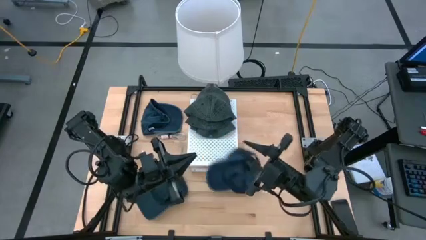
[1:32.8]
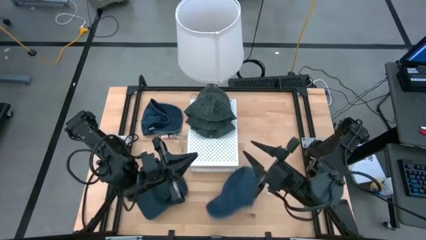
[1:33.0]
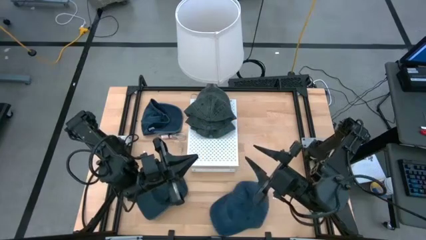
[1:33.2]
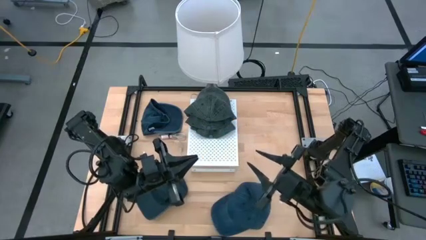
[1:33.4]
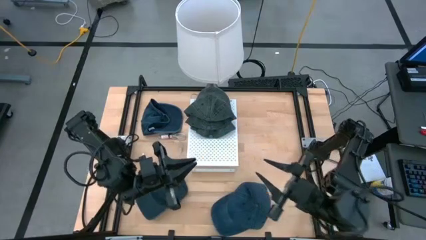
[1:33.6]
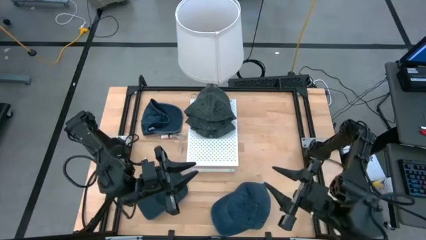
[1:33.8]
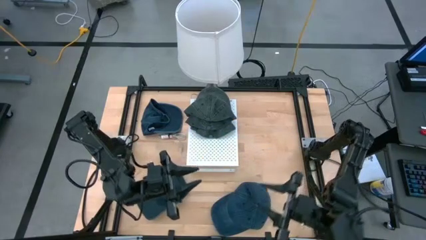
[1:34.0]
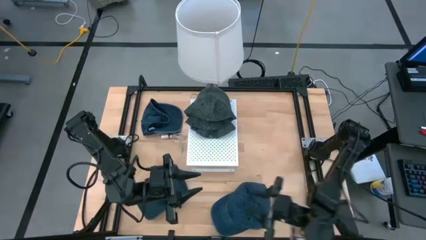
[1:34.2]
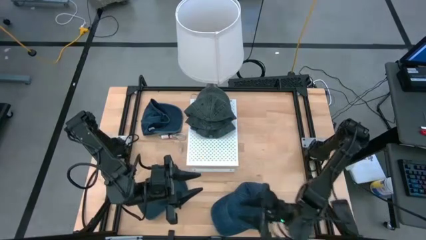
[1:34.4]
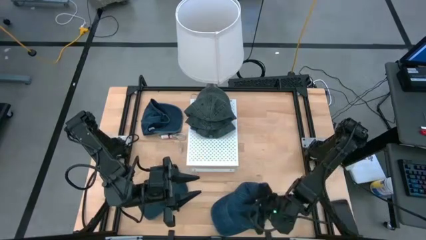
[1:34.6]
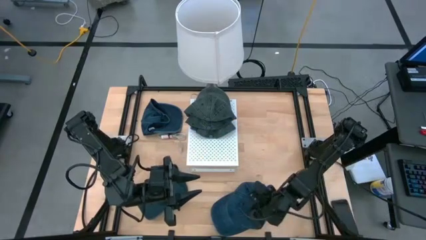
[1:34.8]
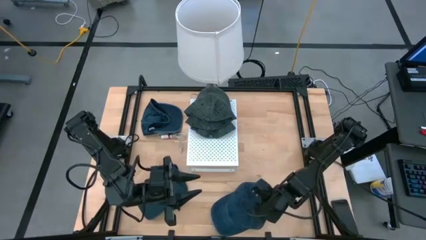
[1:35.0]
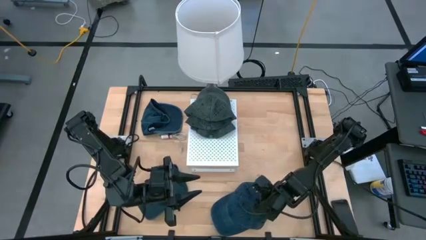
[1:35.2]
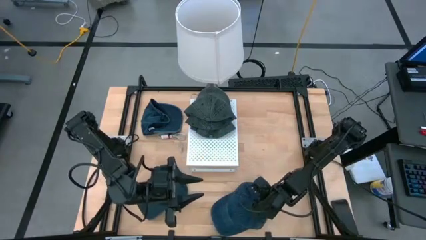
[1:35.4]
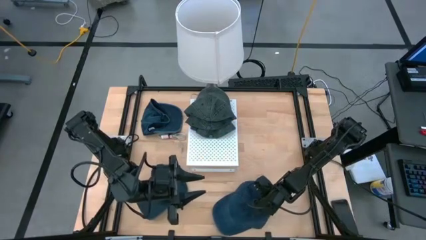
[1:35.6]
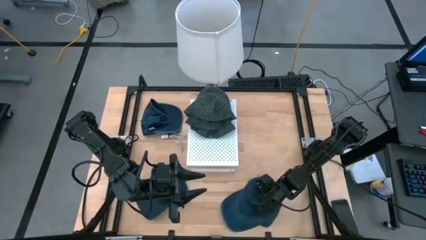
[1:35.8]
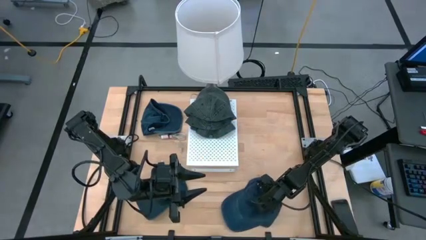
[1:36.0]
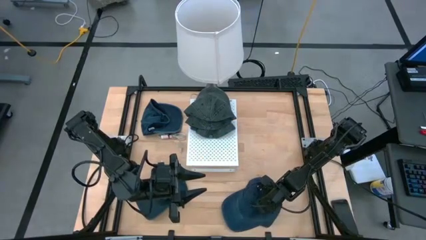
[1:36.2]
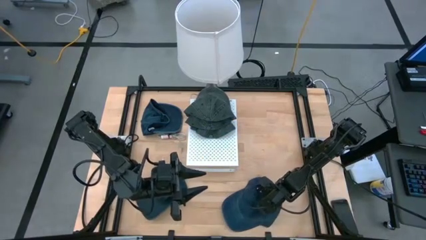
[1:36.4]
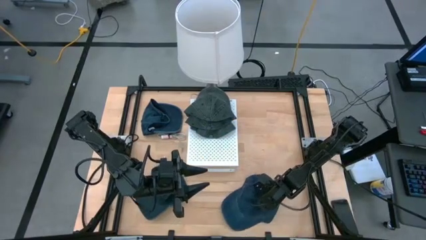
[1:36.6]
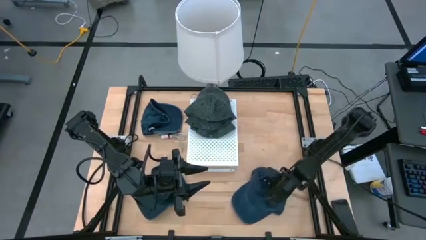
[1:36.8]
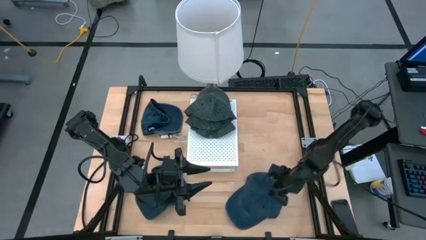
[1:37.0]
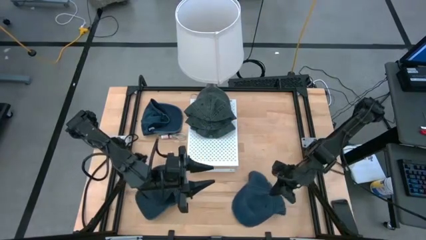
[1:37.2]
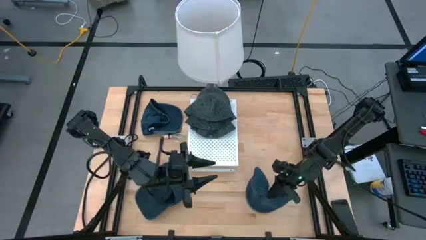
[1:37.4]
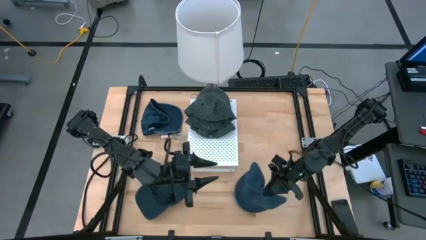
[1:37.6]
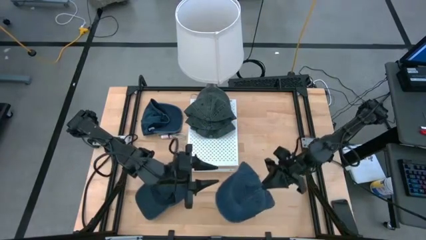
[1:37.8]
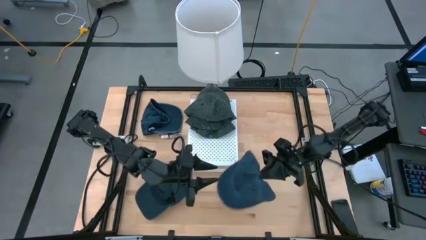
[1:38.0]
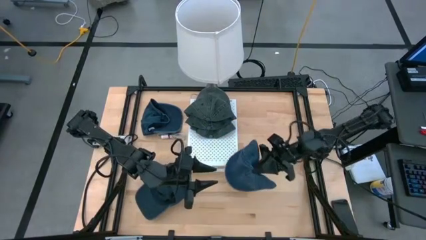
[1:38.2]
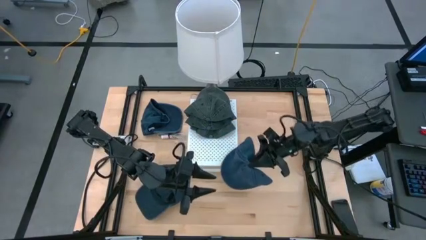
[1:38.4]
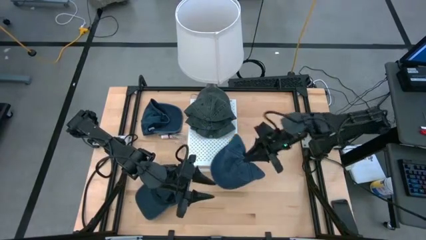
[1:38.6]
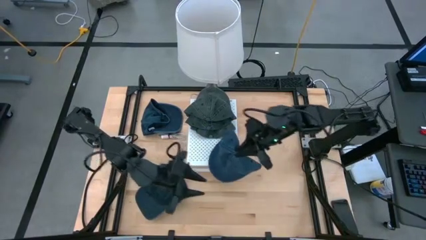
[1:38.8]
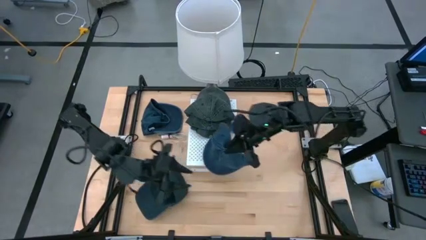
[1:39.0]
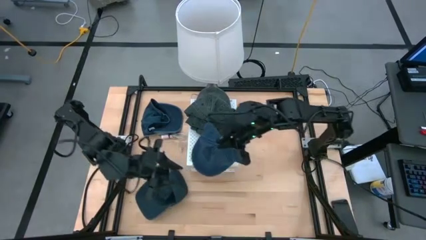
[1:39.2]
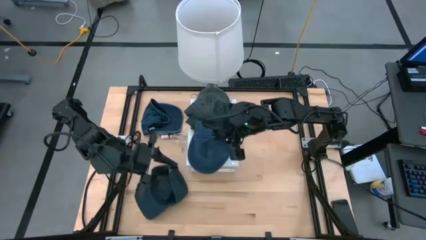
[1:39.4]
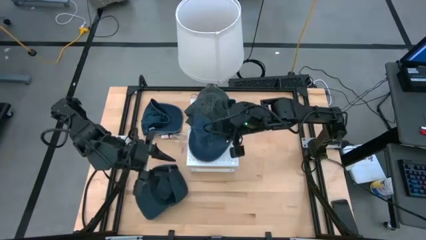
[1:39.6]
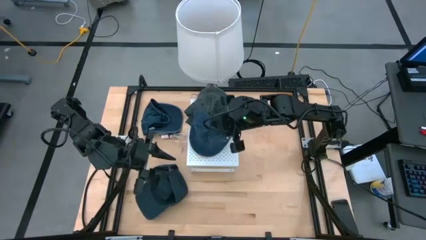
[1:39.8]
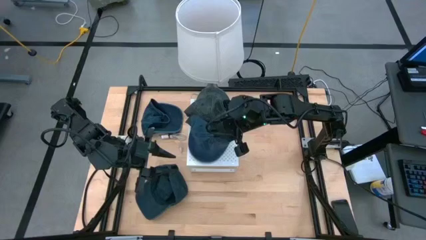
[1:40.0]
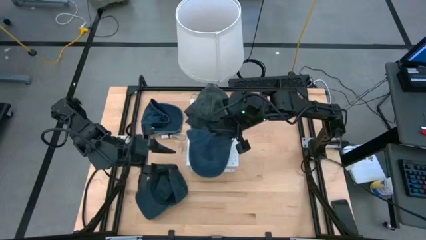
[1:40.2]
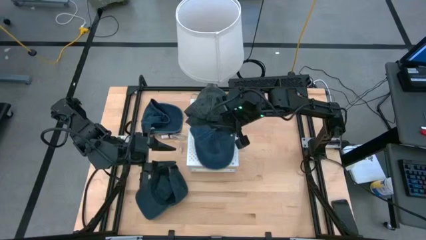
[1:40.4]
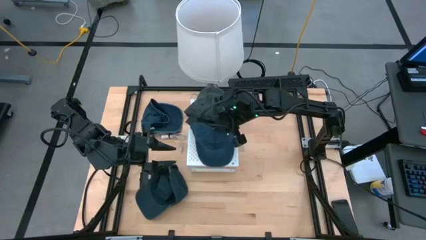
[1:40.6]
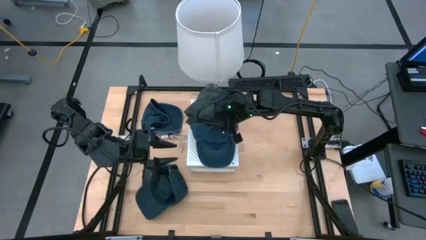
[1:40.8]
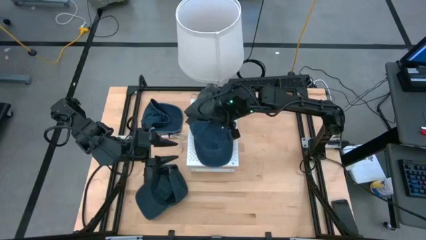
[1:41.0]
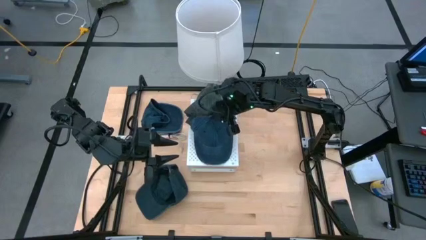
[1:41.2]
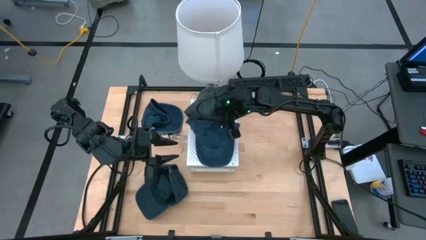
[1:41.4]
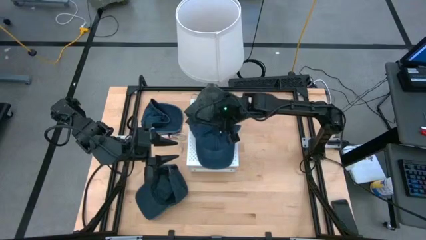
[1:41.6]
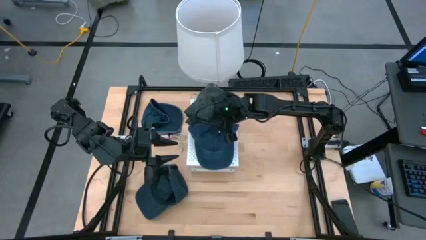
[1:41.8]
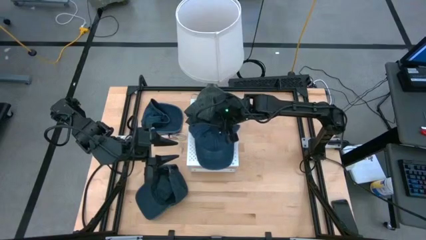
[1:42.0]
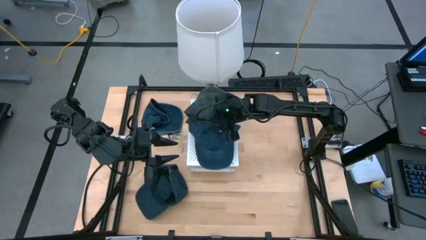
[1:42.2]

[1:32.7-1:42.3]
Task: Pick & Place hat
Put the bottom blue cap on the shelf

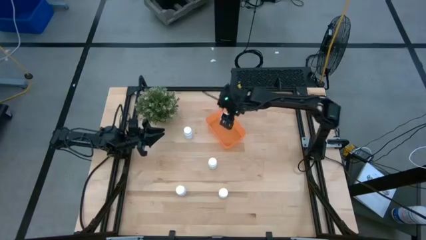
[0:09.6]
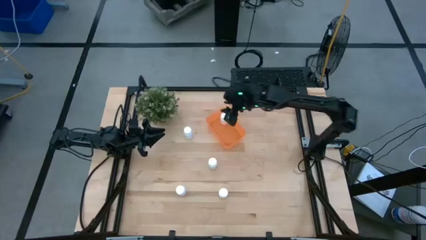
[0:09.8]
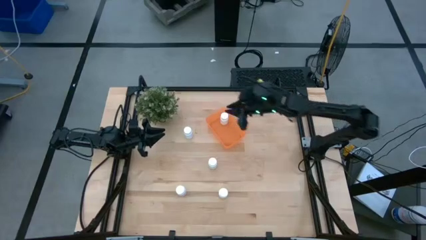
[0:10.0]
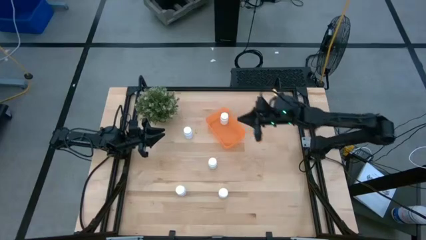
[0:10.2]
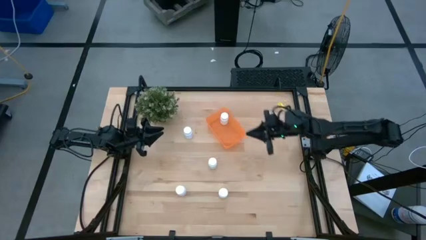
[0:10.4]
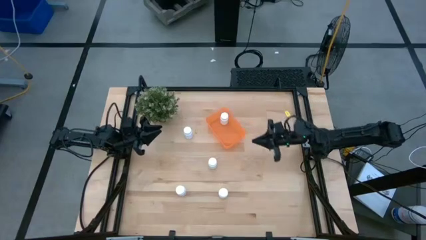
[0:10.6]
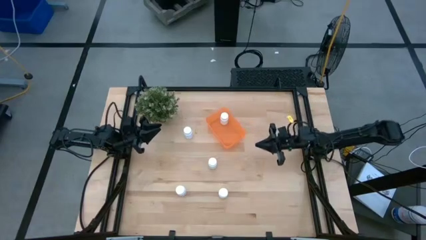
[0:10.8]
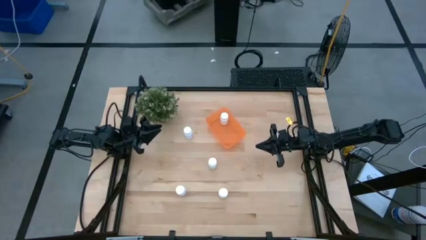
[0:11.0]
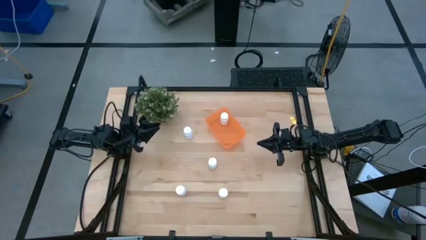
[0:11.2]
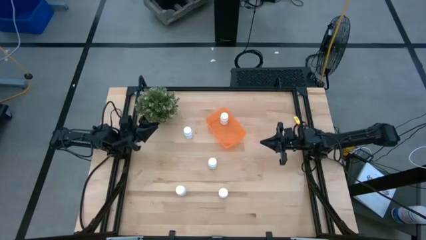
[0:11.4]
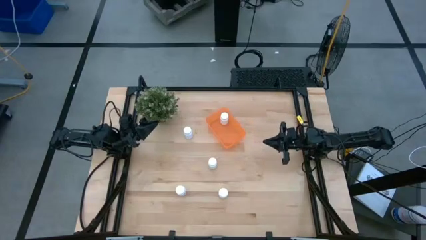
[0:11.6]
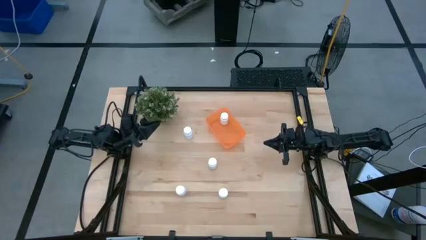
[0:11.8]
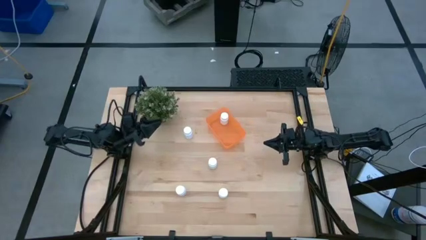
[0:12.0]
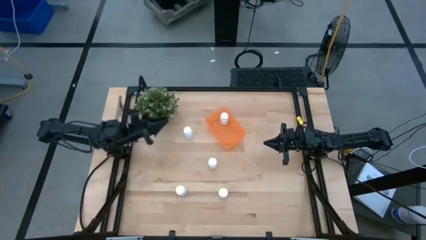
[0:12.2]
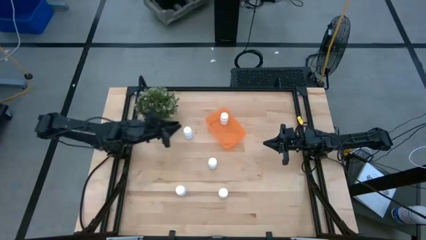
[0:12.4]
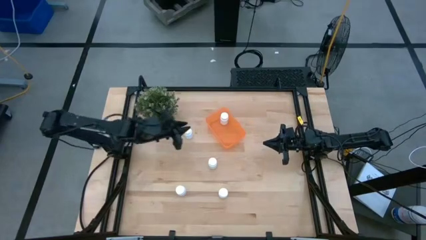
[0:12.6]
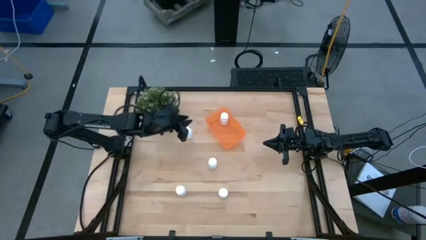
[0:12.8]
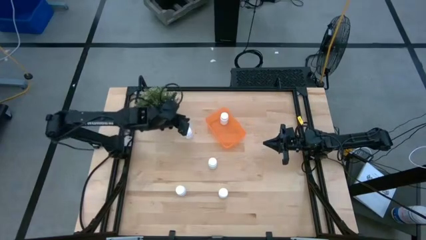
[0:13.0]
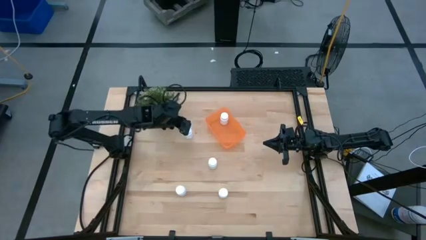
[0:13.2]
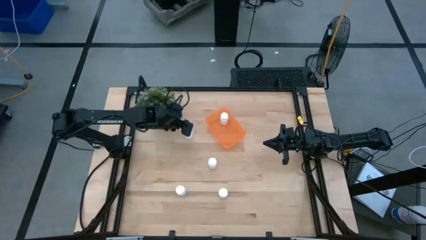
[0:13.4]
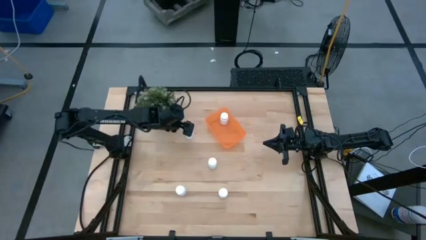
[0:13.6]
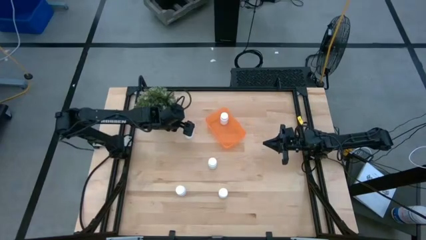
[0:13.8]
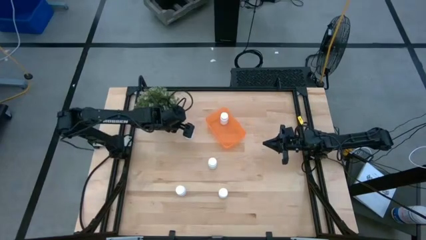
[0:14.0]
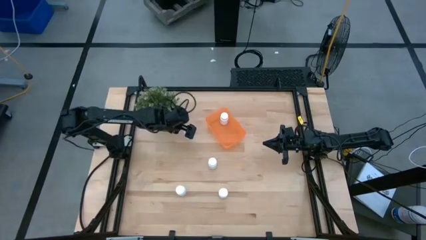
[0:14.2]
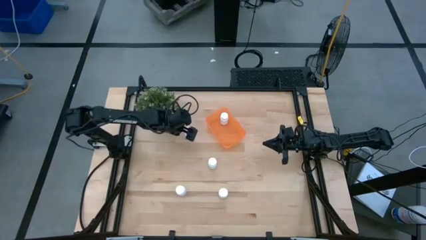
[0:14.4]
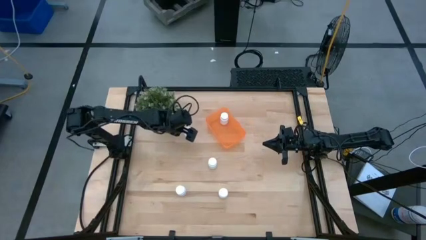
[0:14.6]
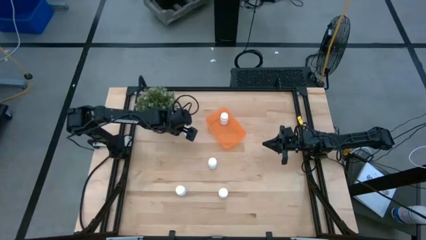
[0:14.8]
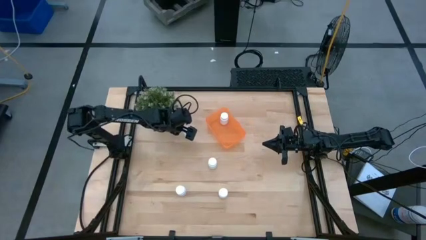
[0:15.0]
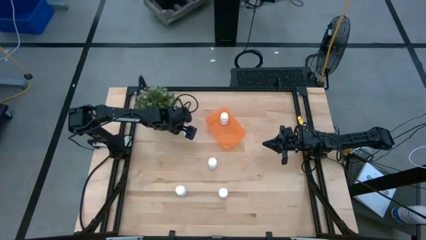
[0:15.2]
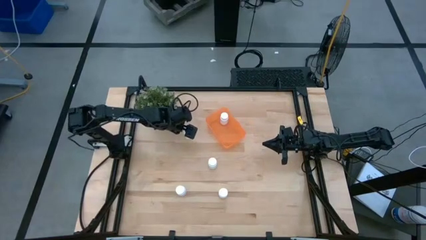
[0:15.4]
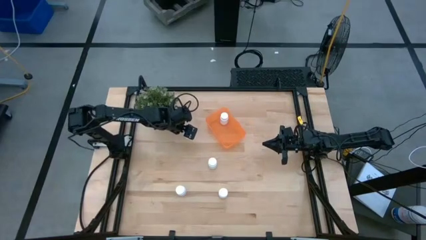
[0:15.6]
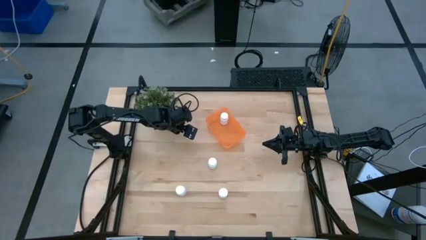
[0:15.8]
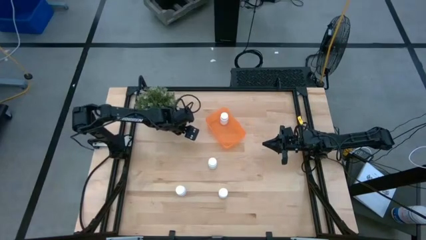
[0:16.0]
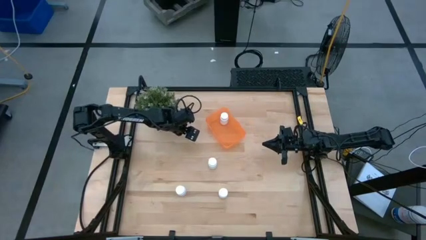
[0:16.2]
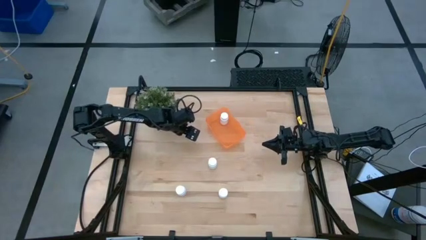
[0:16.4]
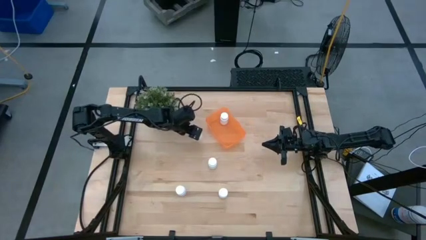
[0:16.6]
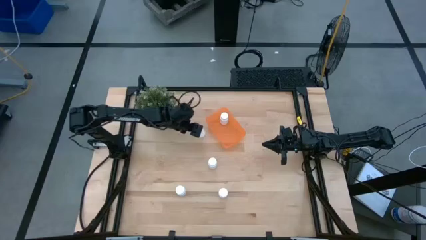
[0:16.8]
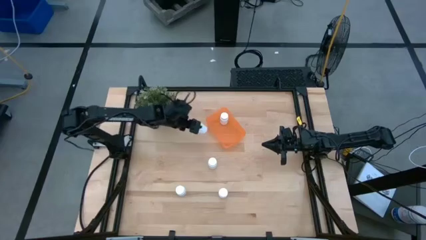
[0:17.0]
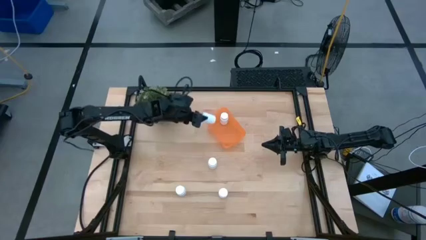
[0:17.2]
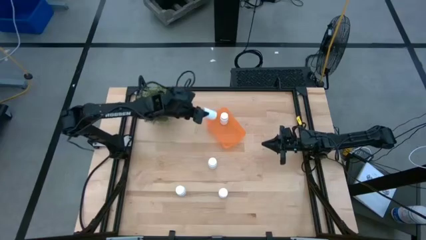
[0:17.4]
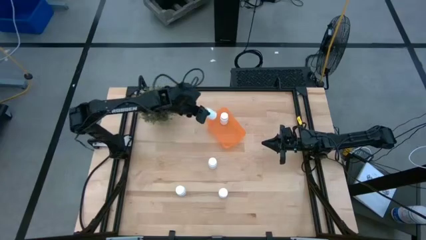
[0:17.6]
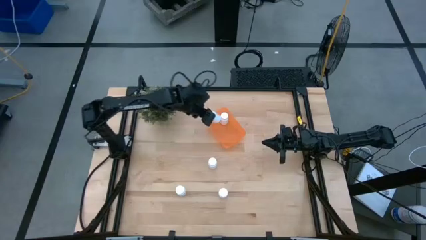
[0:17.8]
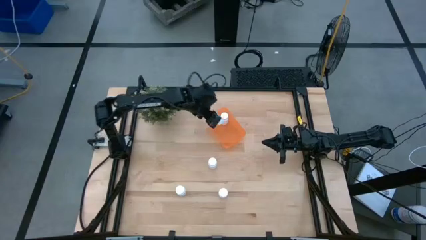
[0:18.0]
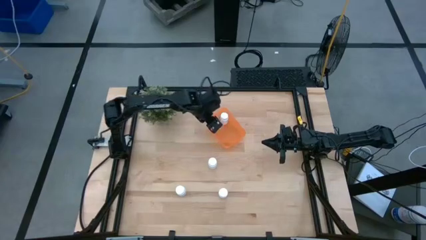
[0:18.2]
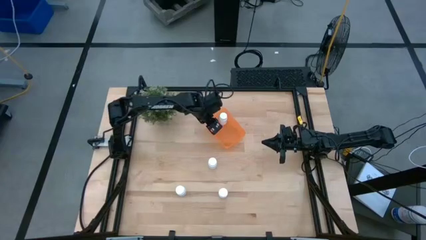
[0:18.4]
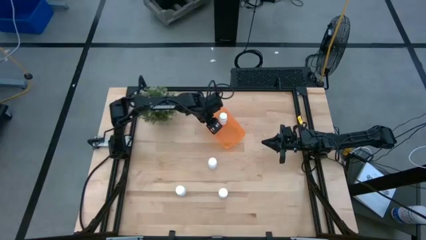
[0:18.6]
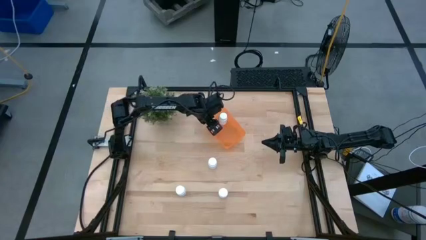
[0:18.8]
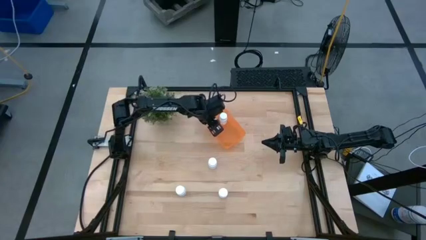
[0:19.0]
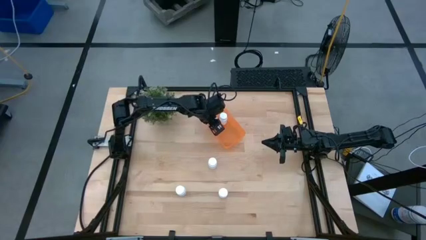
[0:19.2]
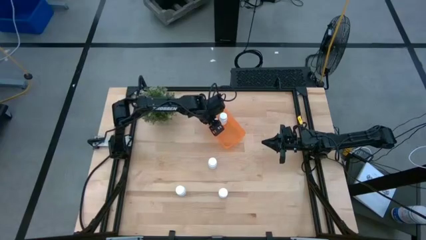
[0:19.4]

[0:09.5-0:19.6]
Task: Pick and place pill bottles into a basket
Put the white pill bottle into the orange bin
